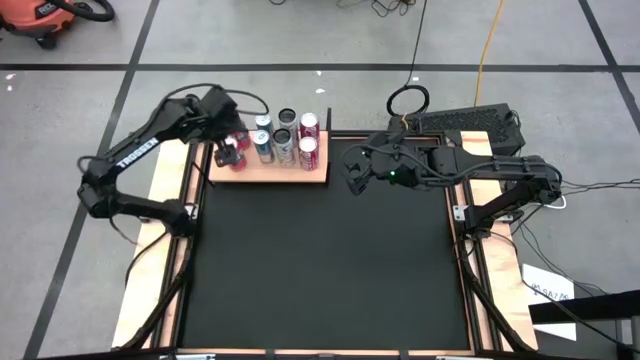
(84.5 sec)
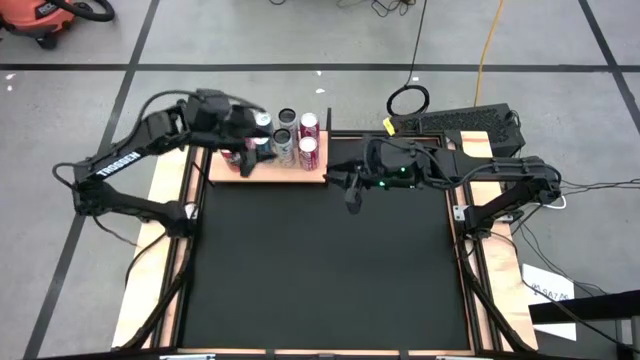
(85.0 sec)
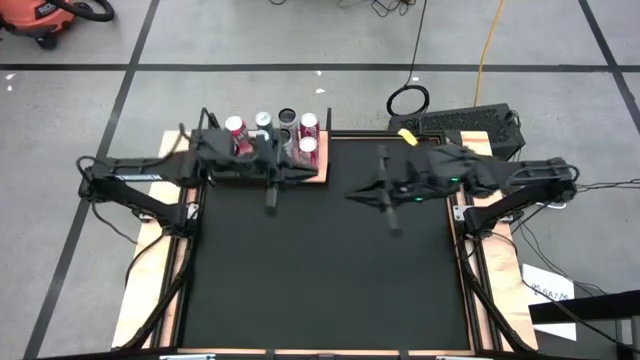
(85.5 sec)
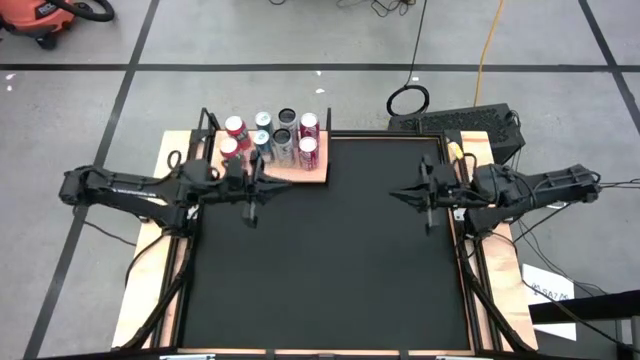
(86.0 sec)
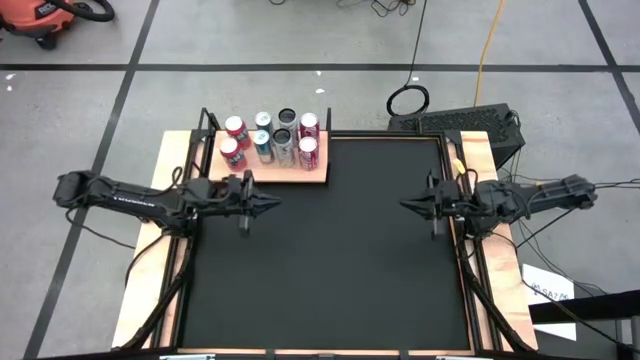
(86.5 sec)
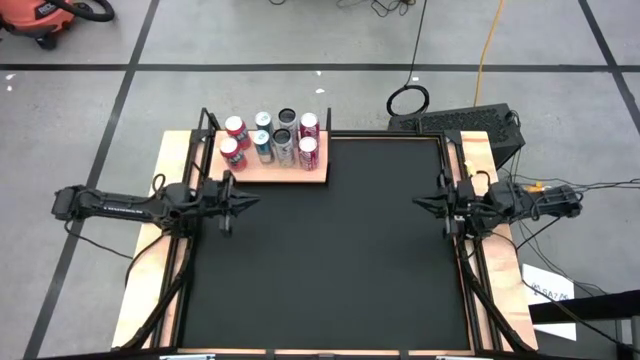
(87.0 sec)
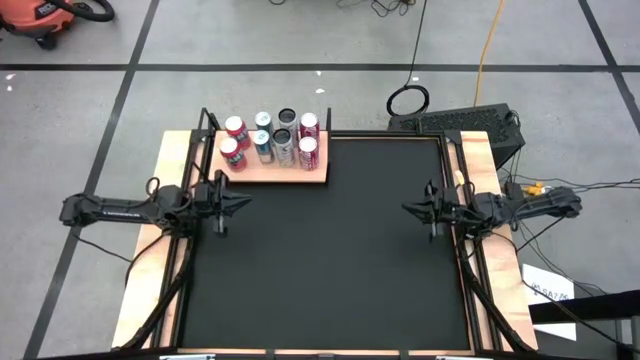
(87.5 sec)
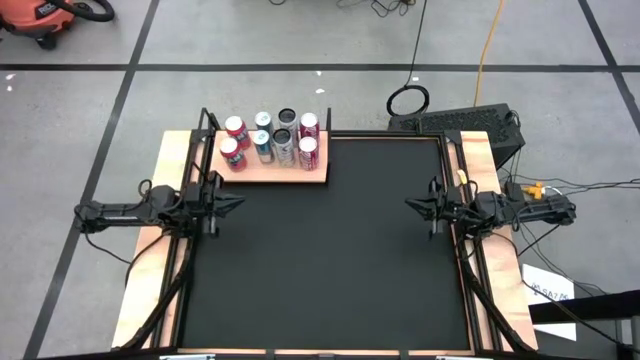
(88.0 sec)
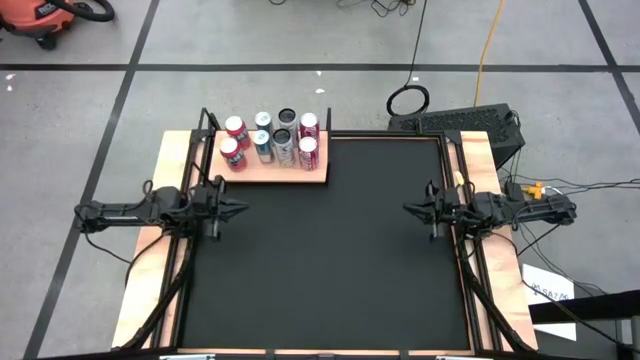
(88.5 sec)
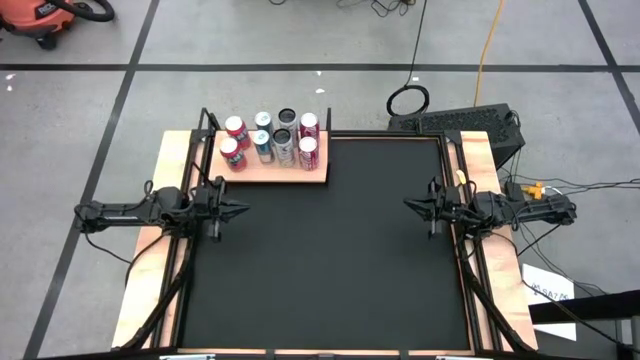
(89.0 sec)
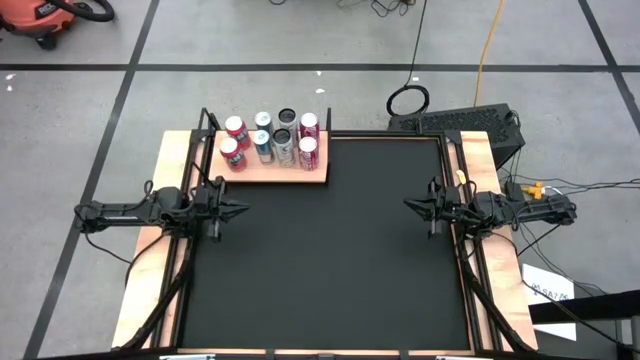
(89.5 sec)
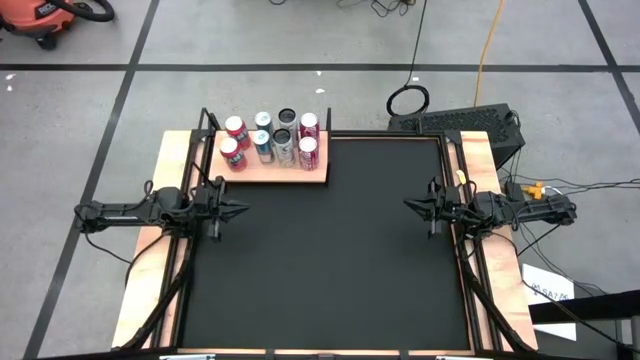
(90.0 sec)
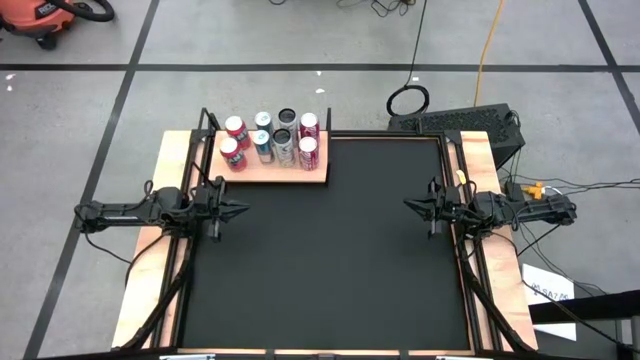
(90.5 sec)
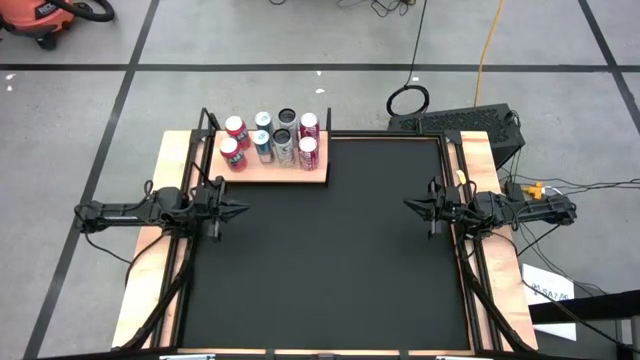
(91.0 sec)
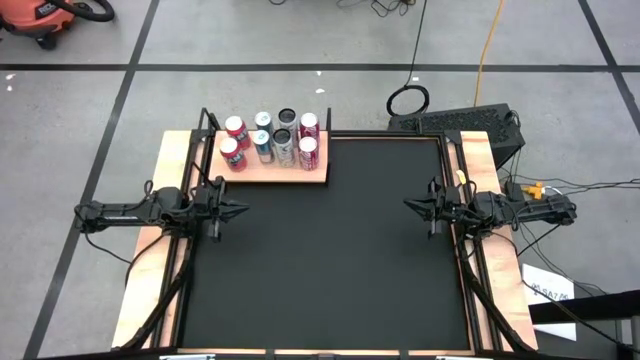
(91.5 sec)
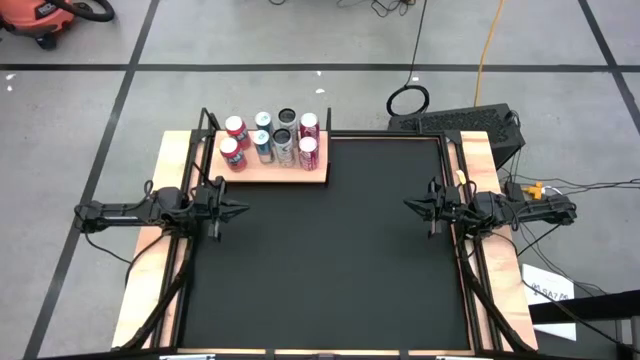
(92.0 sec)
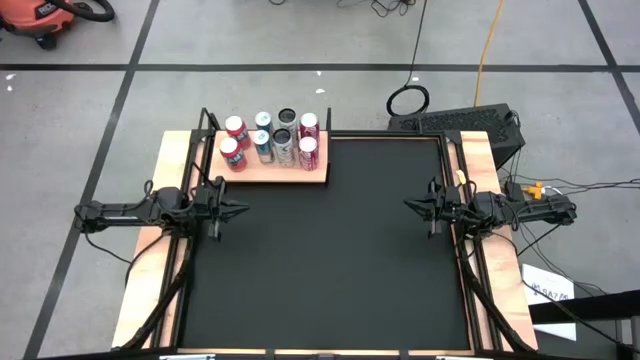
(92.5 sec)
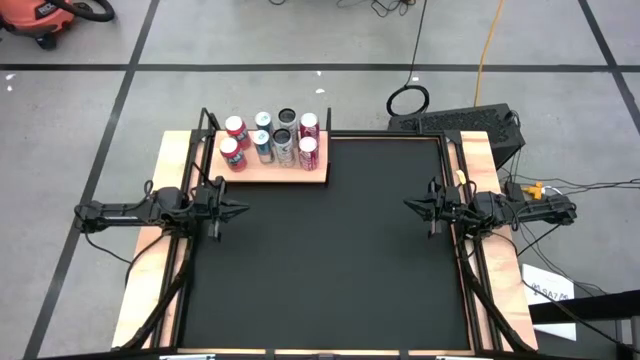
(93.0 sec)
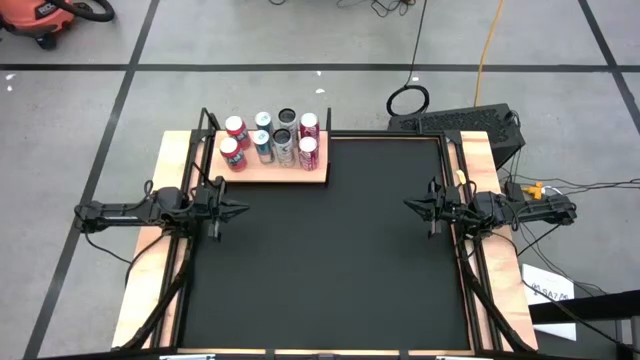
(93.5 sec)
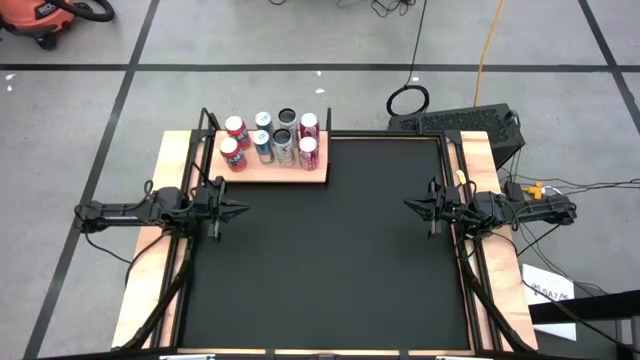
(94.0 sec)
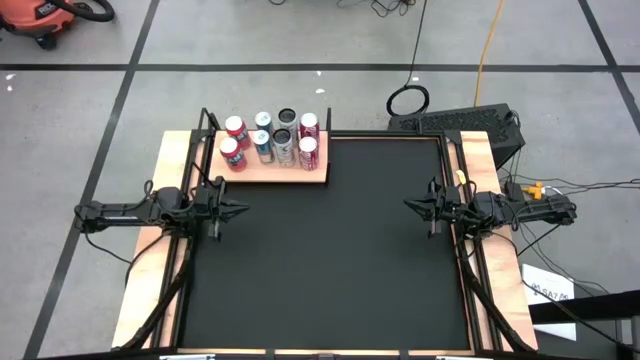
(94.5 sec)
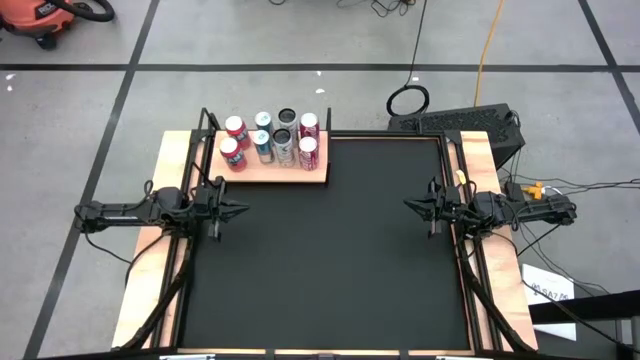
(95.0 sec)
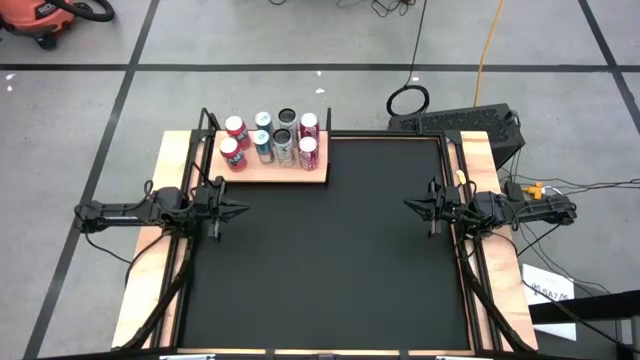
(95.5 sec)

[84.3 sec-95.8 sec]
Task: Place canned beverage on shelf
Return to Home Position

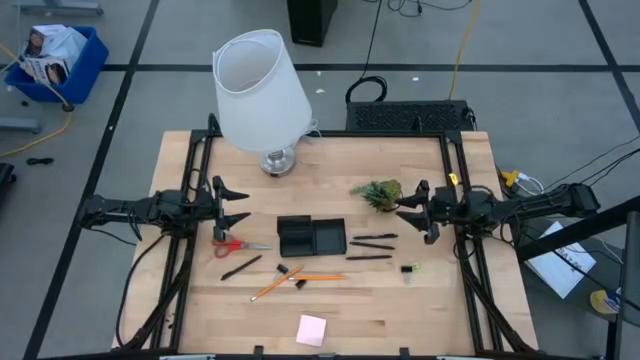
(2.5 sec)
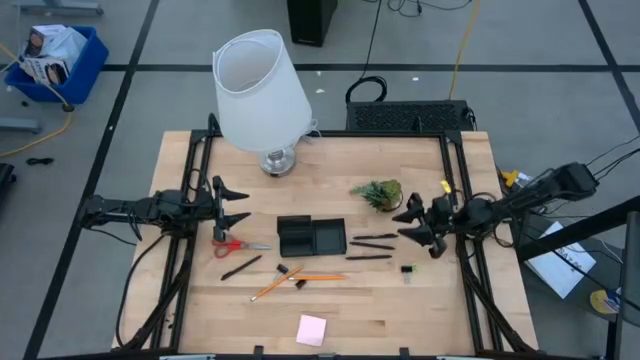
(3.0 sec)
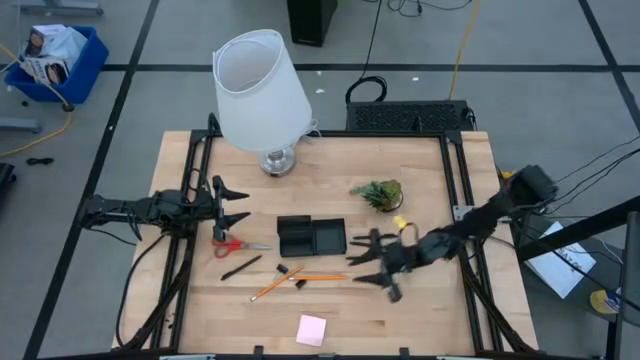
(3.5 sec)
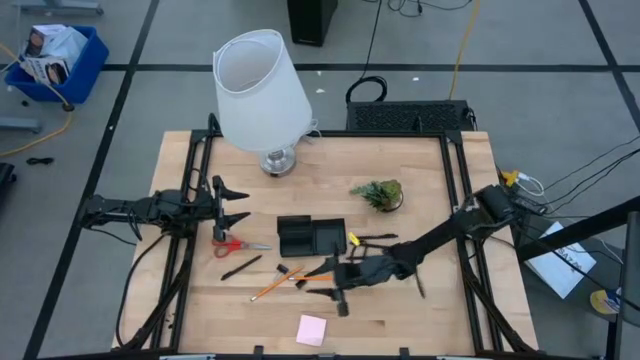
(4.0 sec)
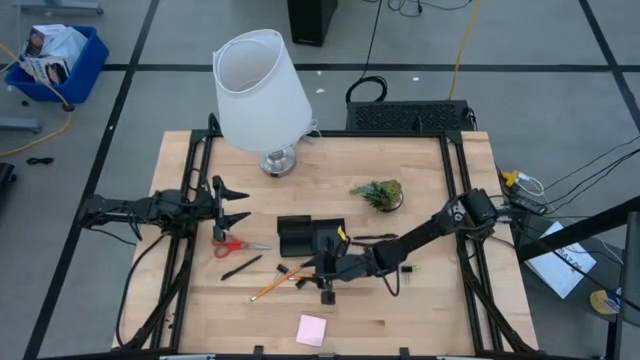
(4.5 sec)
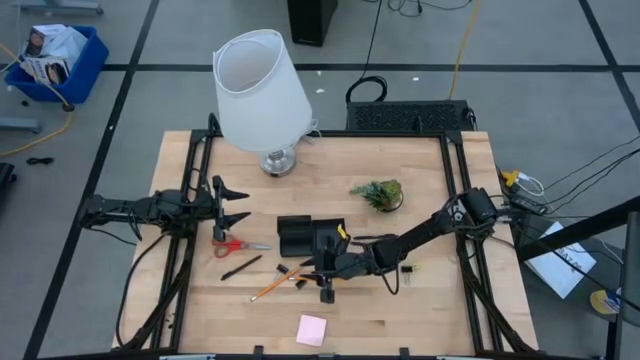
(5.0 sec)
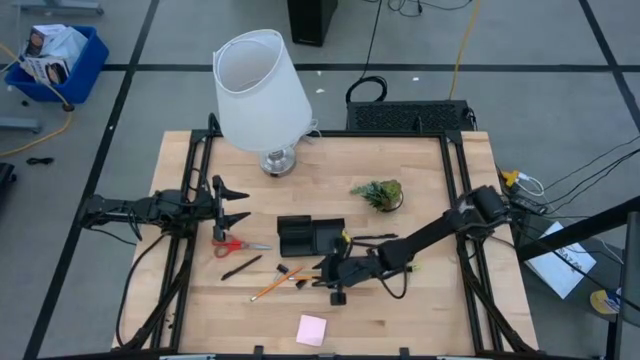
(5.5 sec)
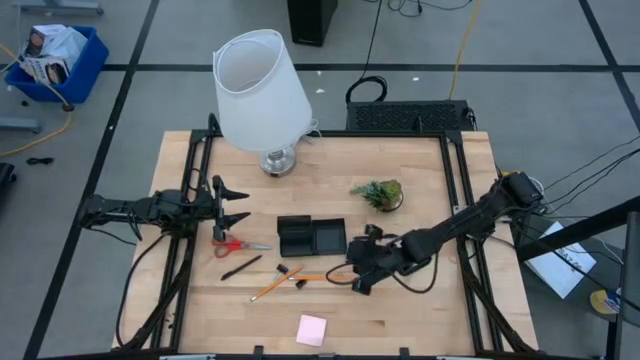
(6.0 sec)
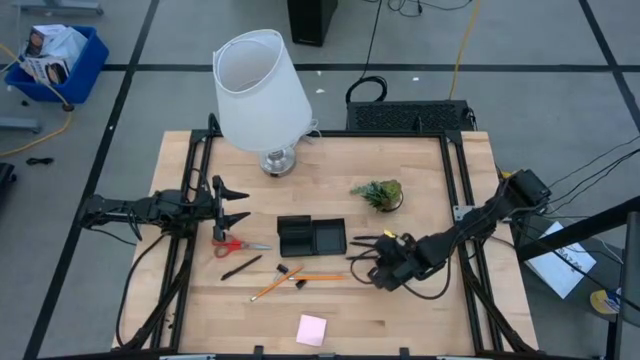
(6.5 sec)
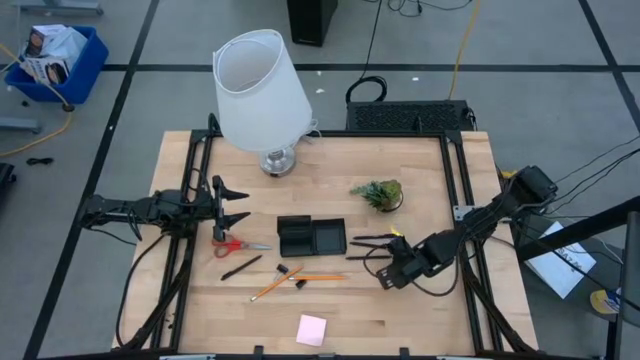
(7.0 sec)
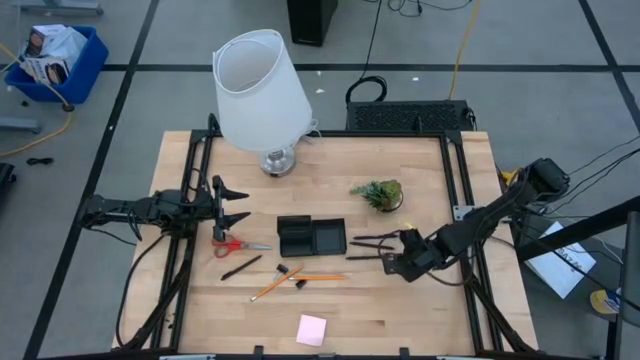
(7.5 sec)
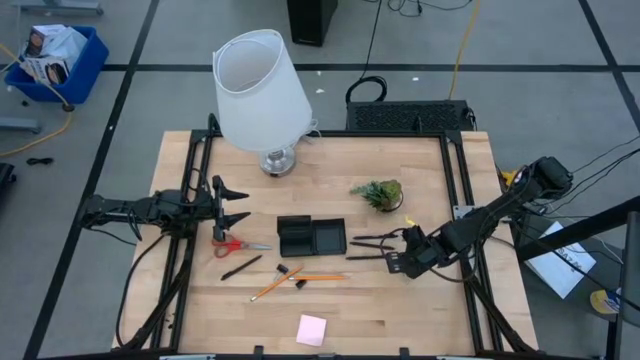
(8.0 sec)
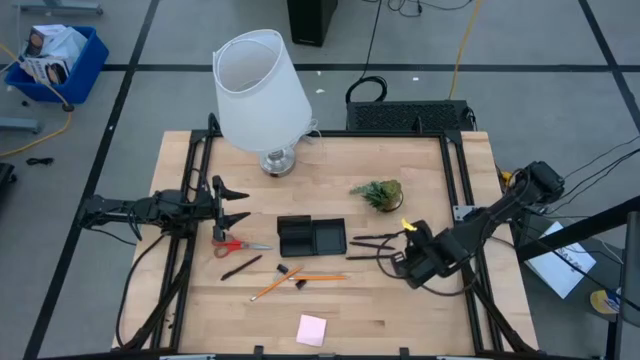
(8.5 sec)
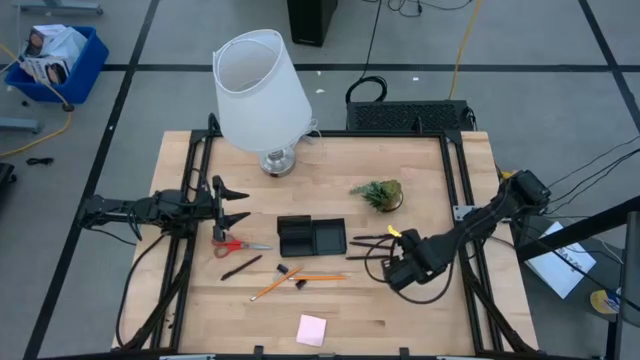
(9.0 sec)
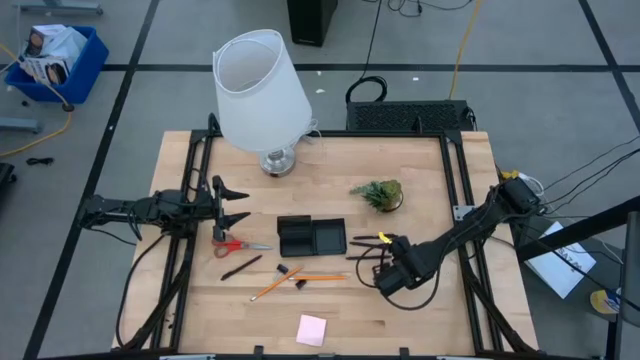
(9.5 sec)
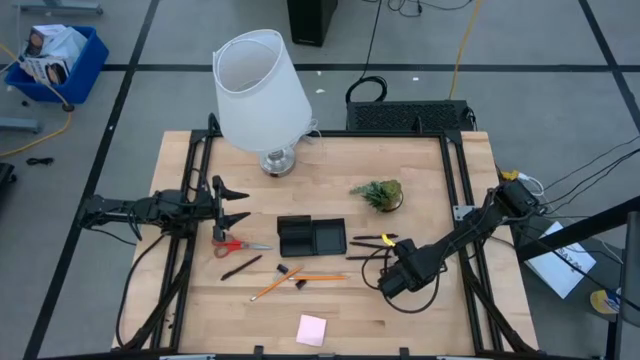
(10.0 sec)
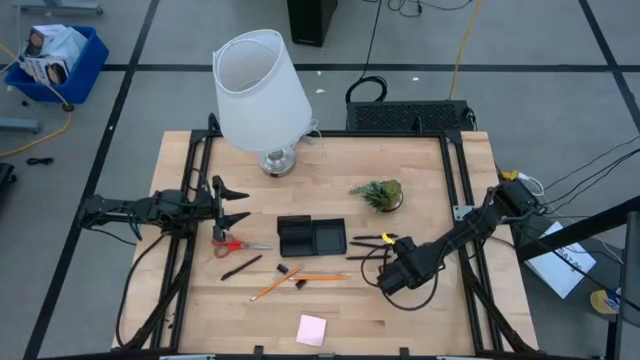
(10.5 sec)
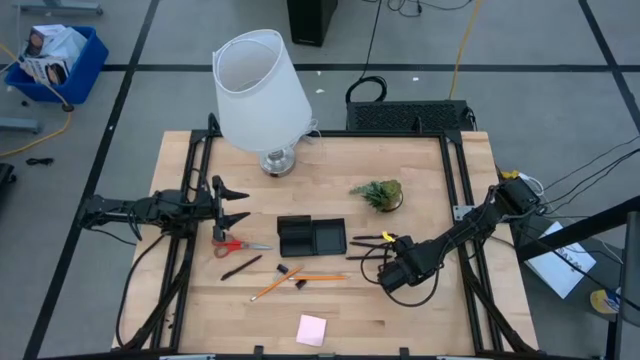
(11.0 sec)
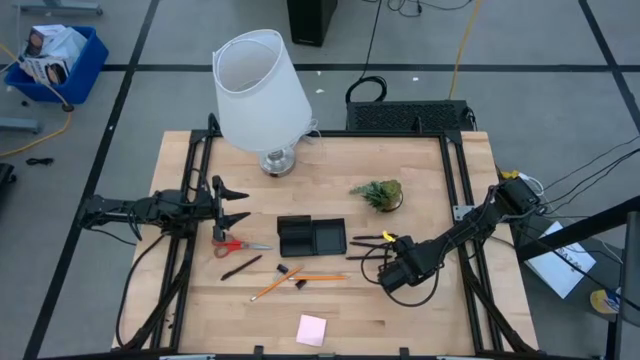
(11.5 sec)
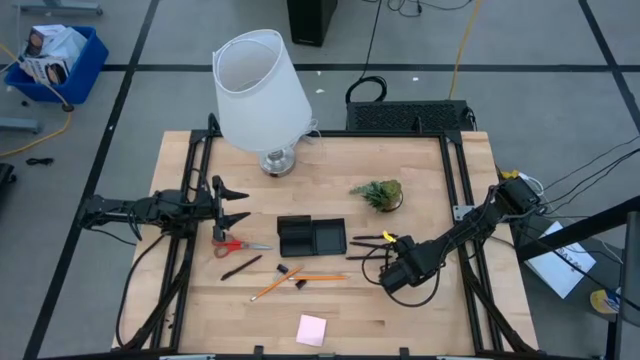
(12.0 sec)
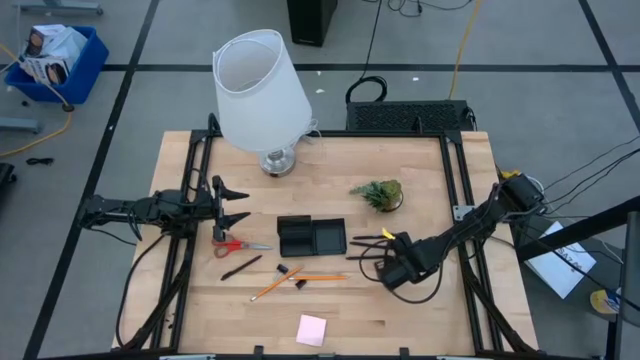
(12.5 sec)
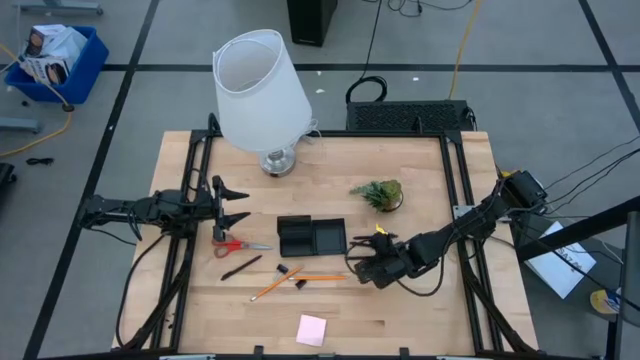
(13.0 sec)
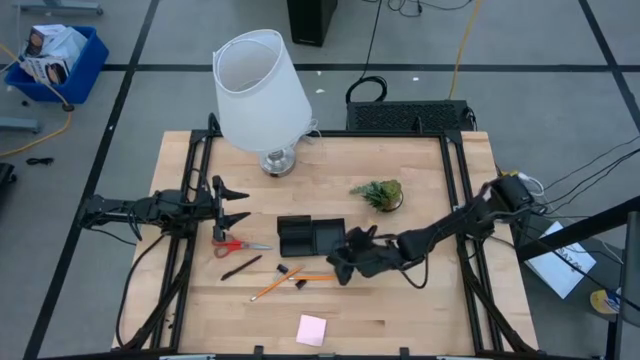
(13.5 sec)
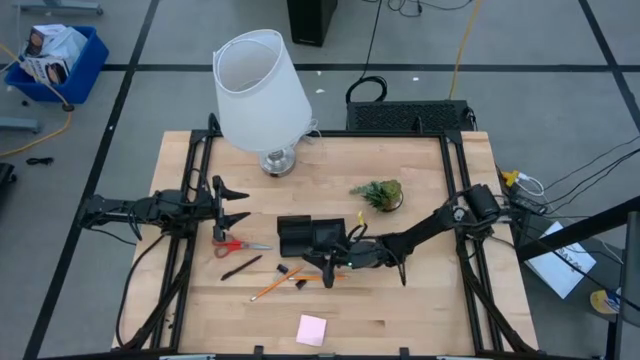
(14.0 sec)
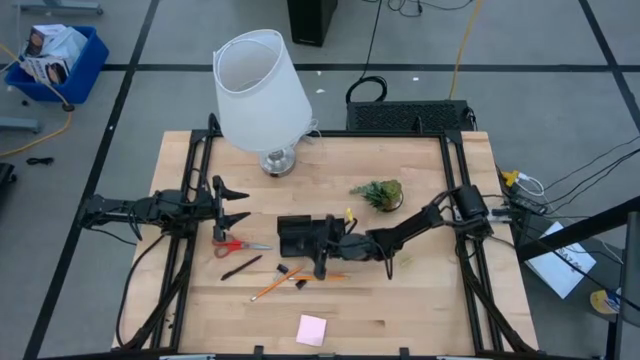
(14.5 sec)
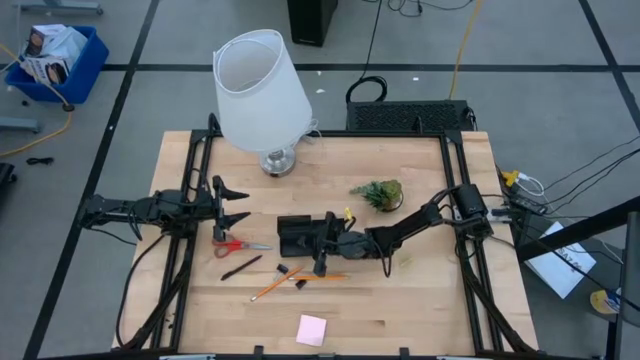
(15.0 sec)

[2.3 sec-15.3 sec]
Task: Pick and place office supplies into organizer
Put the top right black binder clip into the black desk organizer
